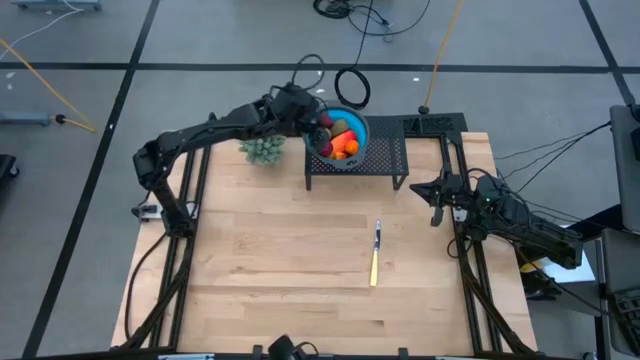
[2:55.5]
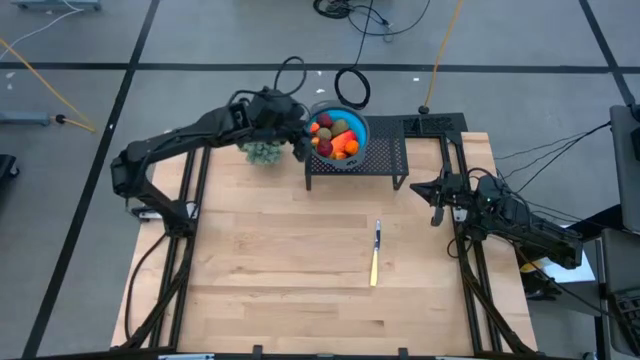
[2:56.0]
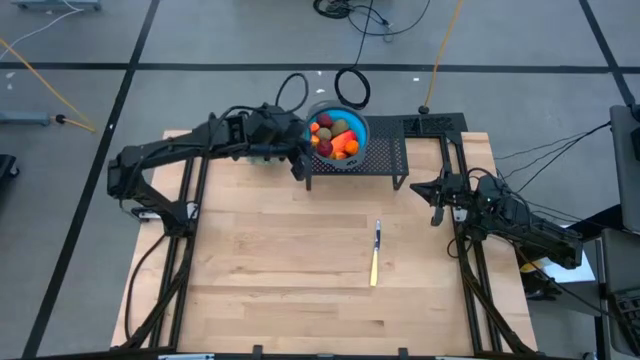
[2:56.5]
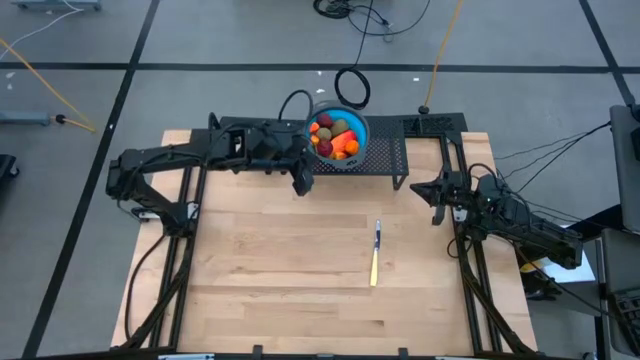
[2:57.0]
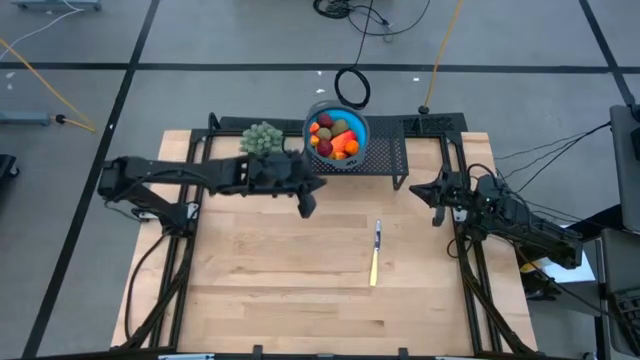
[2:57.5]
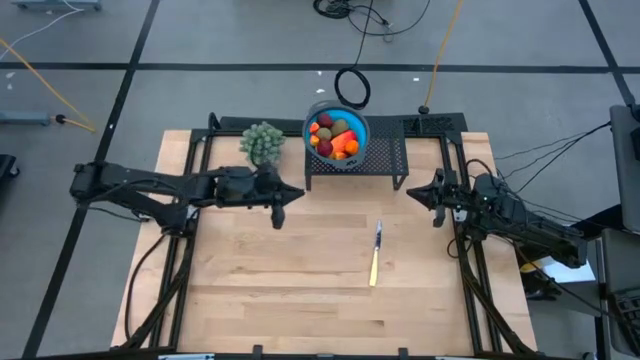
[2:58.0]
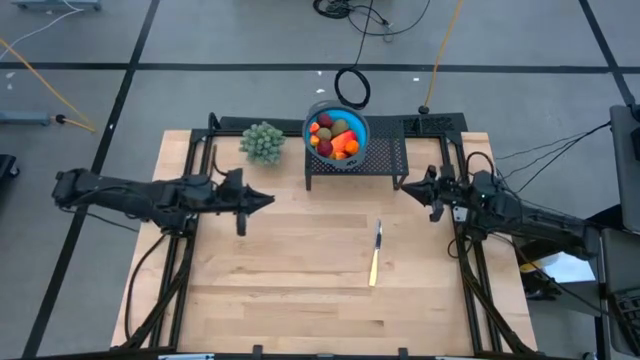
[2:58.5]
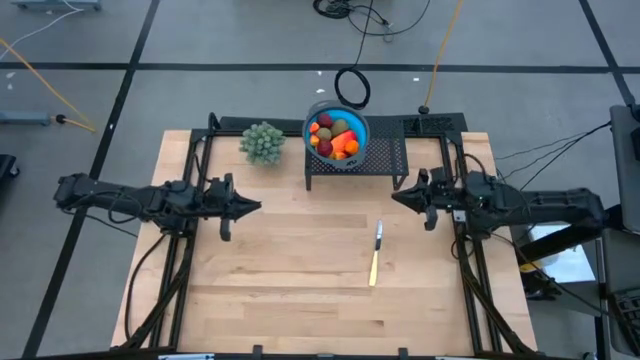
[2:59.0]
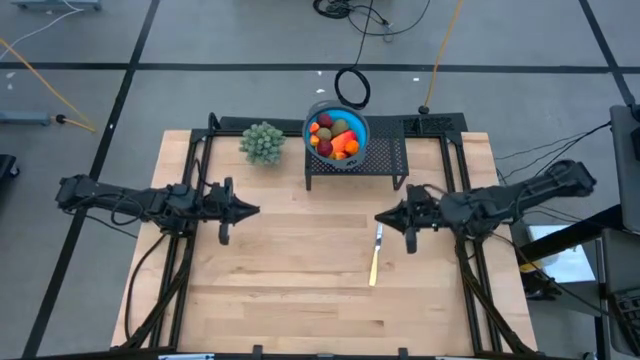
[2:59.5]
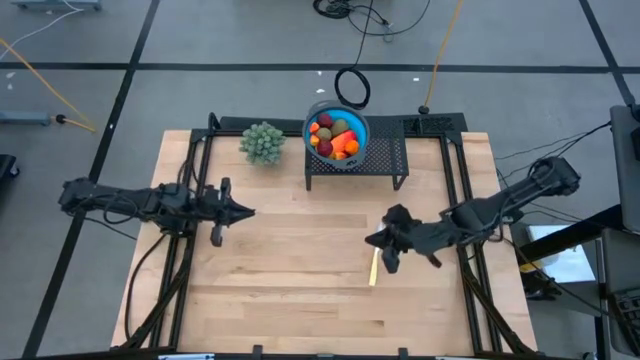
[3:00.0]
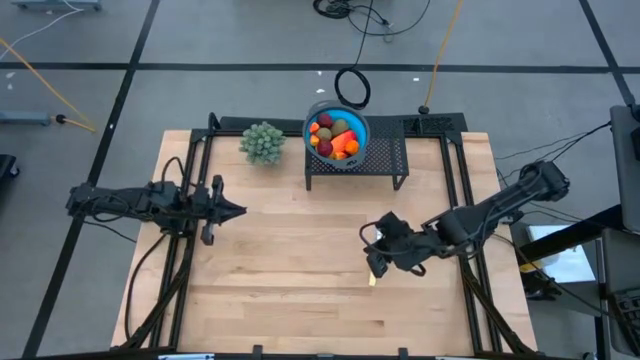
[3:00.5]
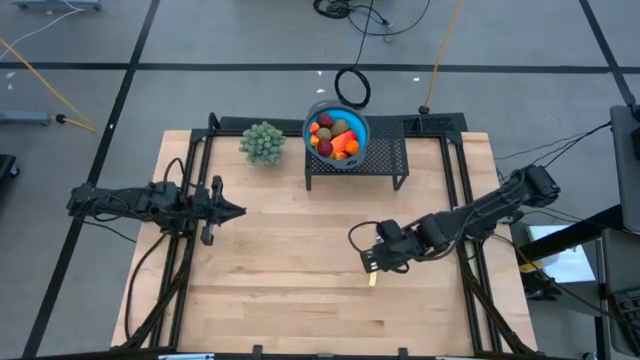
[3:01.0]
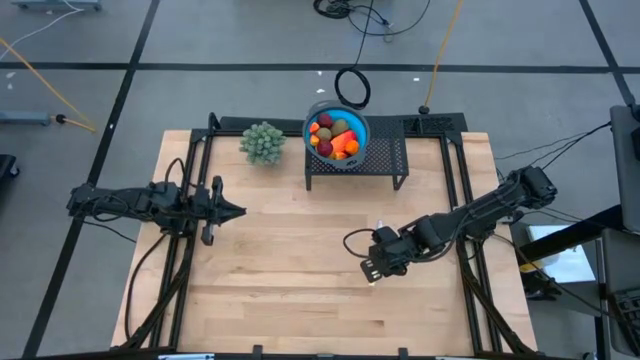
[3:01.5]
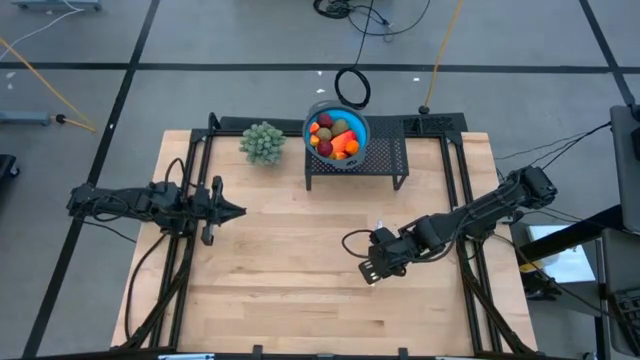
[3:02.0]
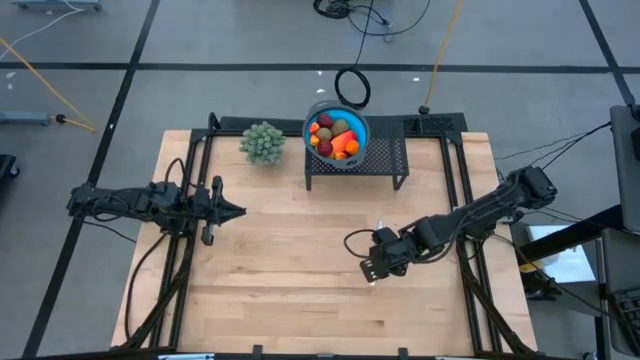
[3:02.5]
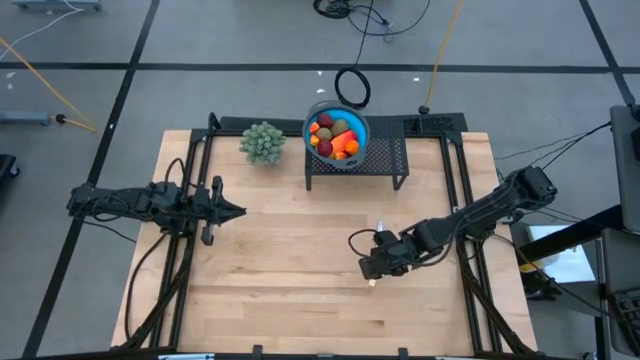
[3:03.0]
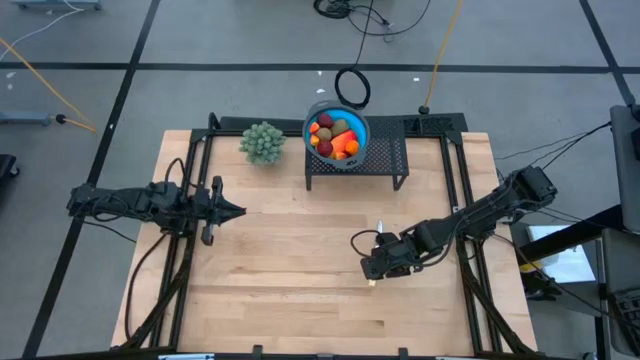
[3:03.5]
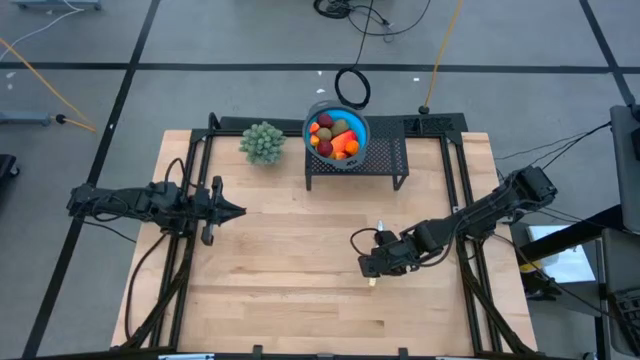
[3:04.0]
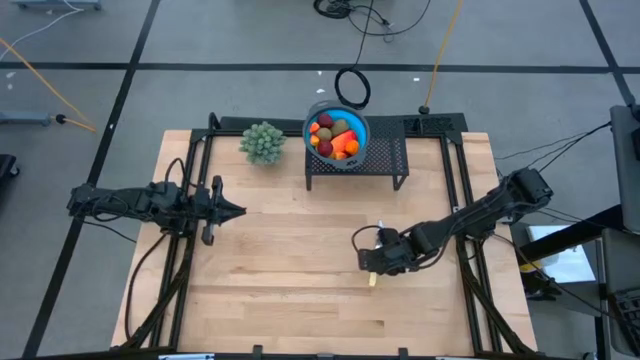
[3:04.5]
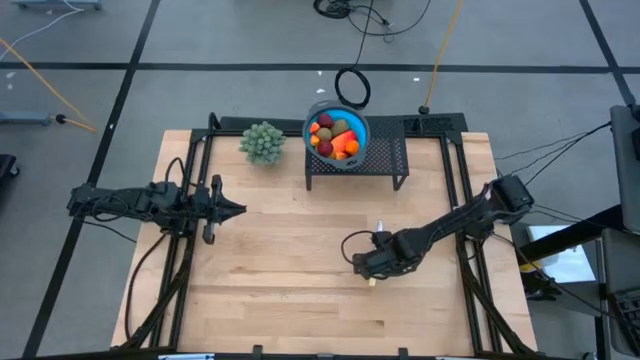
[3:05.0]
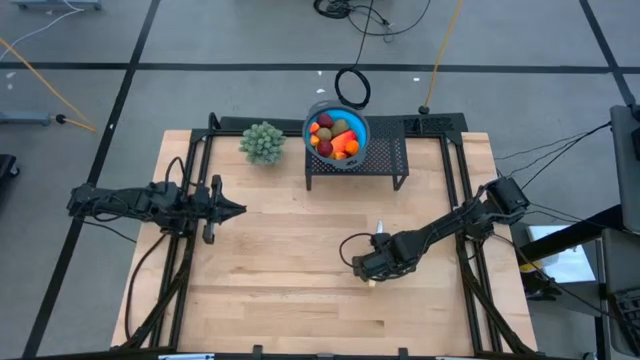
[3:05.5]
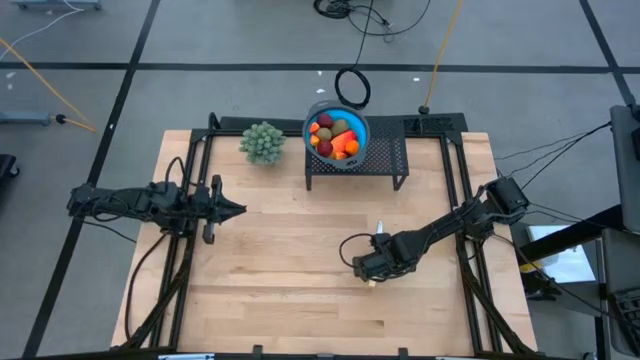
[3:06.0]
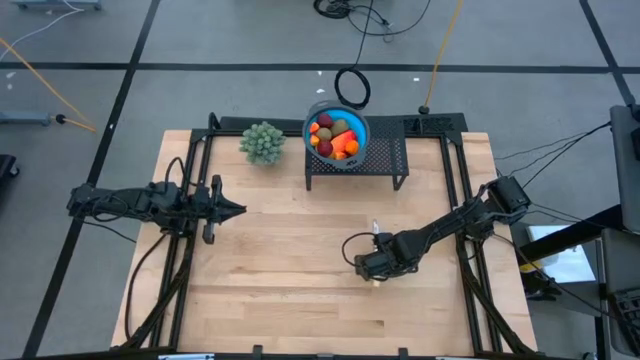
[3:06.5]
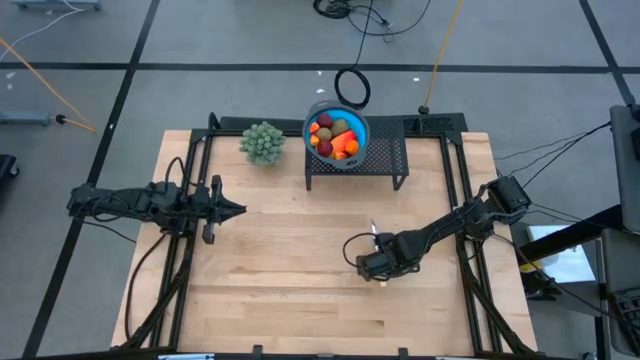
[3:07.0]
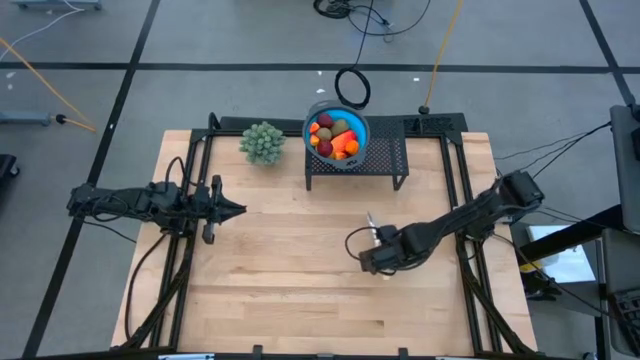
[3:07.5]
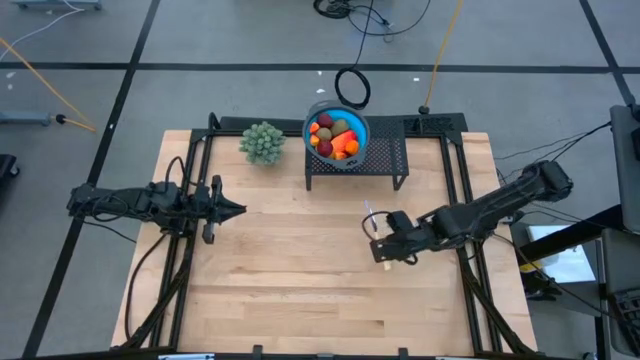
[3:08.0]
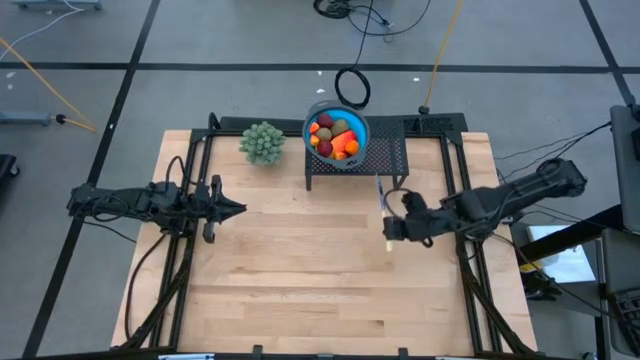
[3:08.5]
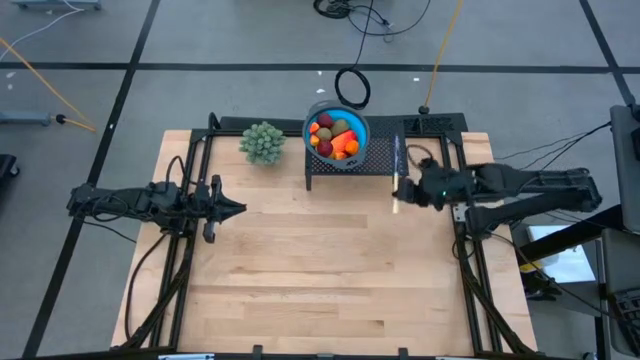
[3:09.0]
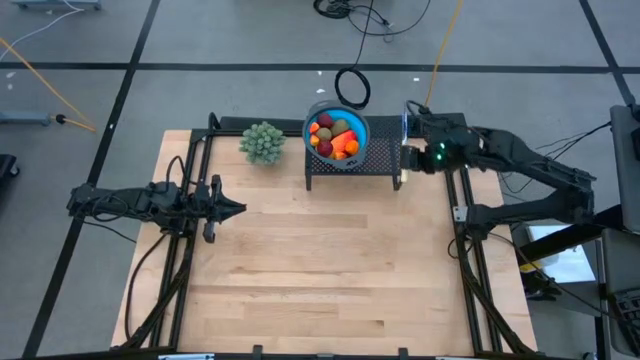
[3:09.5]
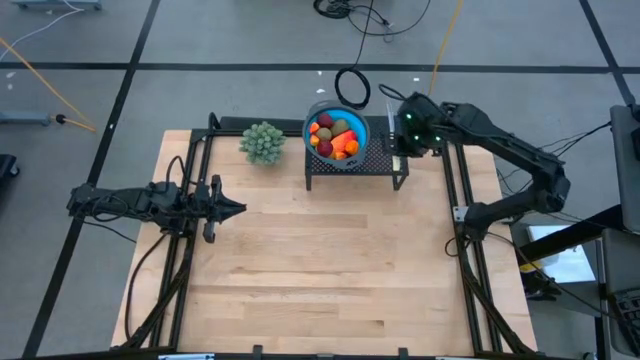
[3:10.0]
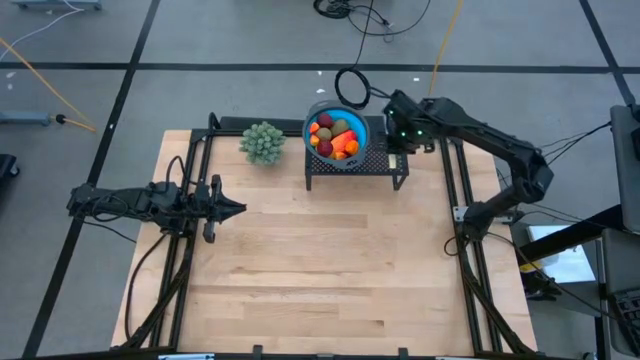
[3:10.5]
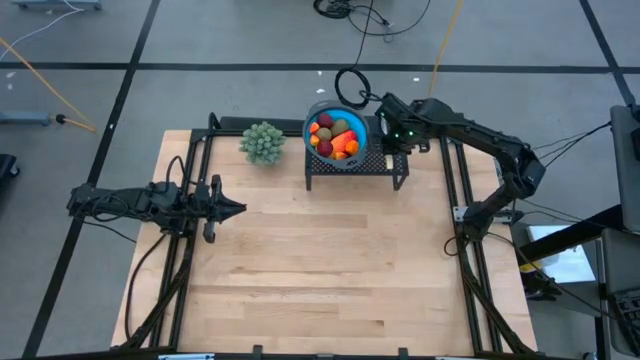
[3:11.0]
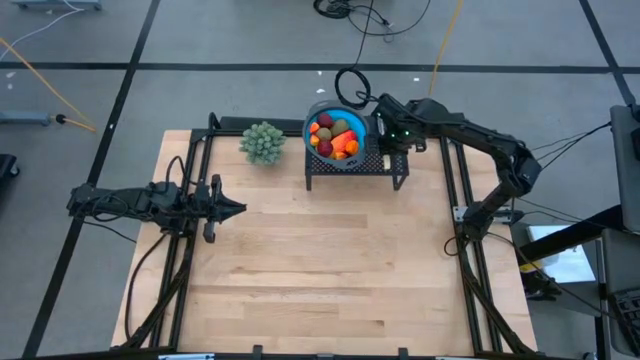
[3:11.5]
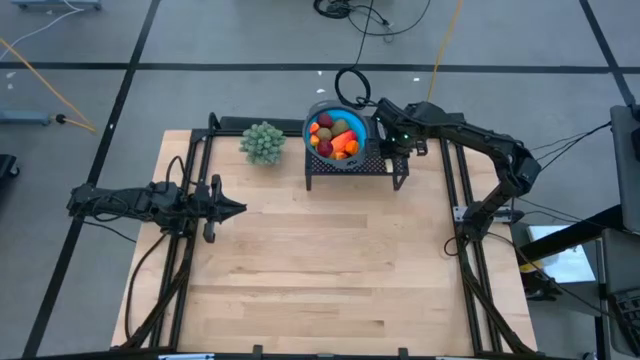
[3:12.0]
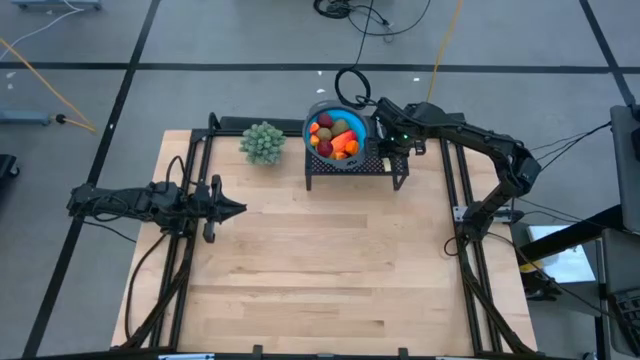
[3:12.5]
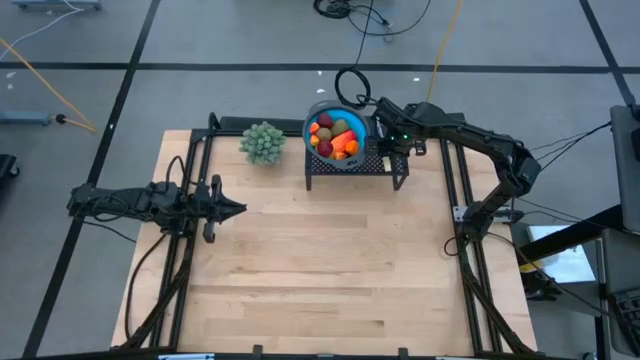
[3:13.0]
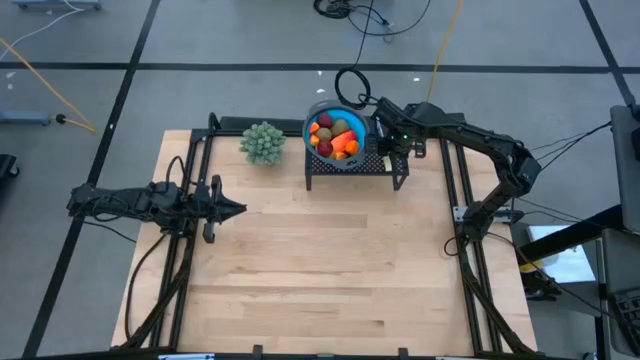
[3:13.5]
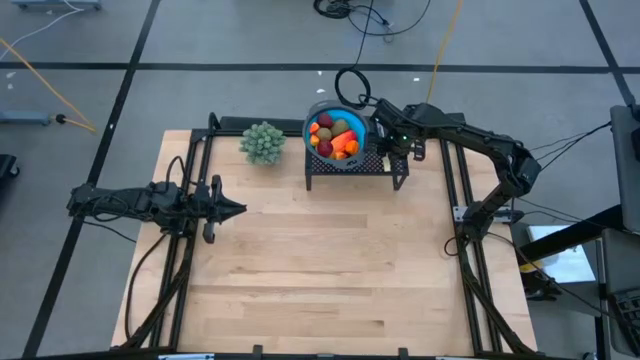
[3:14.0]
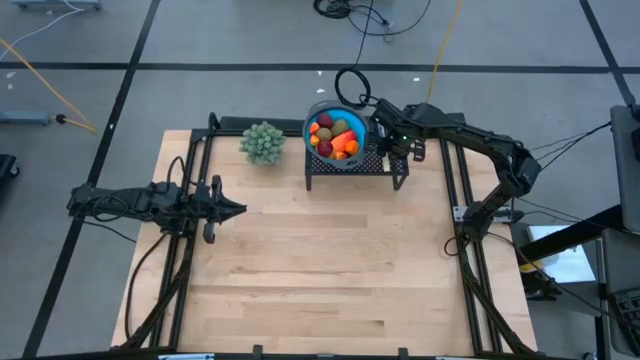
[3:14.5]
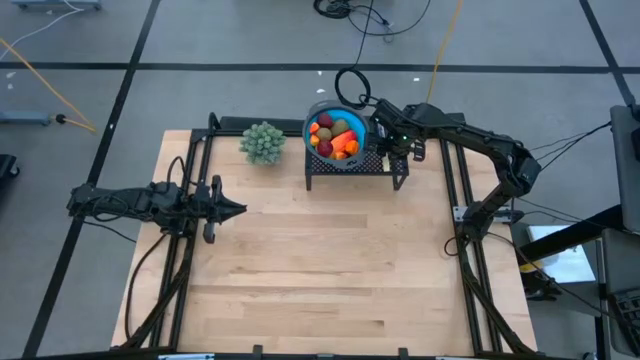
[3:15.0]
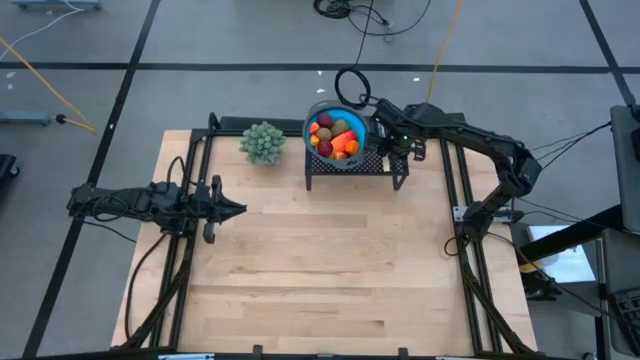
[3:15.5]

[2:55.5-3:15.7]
Task: Pick & Place Fruit
Put the yellow knife on the shelf
